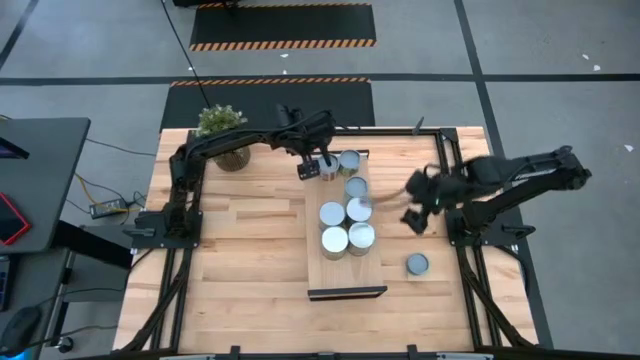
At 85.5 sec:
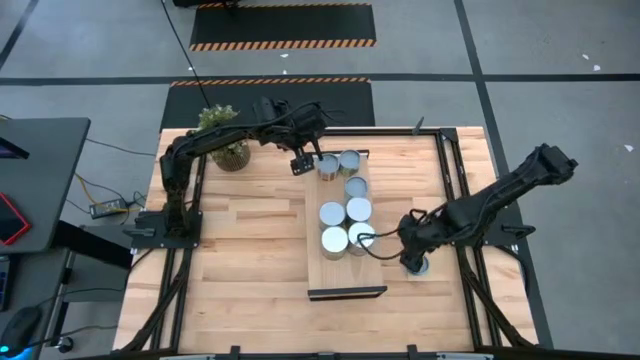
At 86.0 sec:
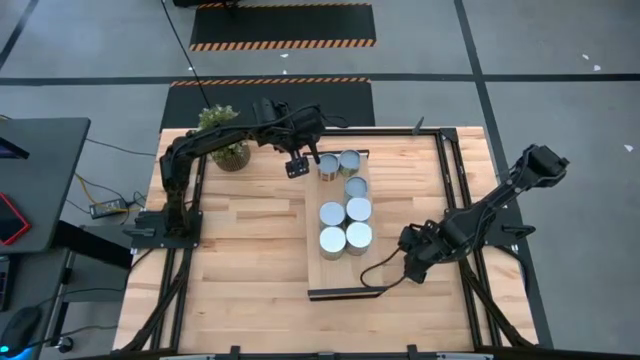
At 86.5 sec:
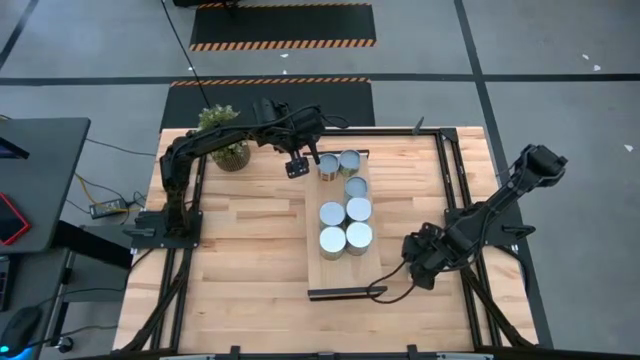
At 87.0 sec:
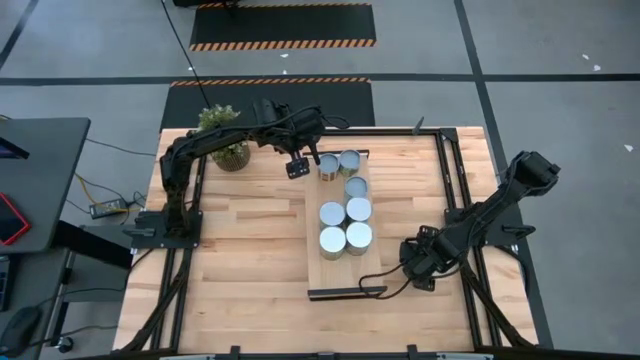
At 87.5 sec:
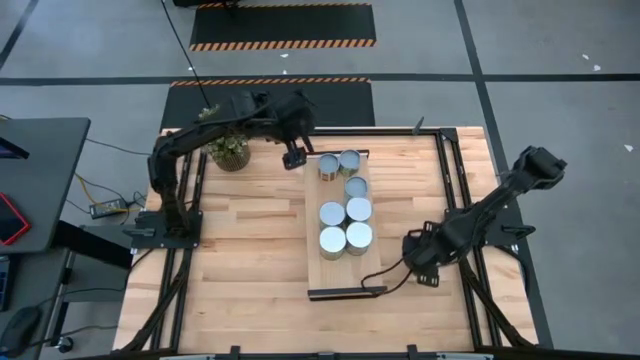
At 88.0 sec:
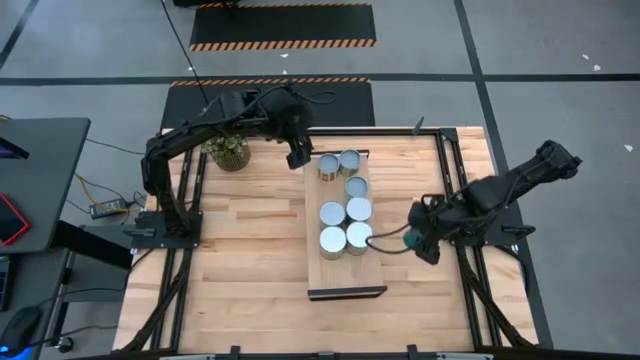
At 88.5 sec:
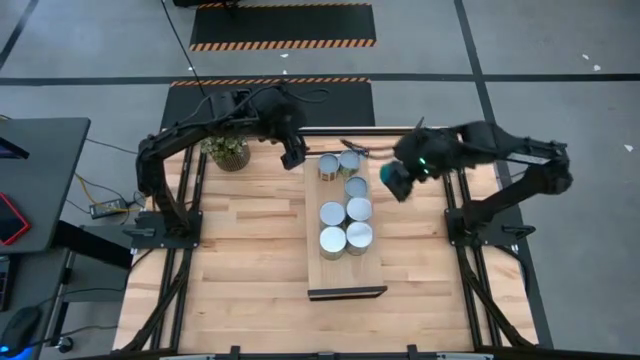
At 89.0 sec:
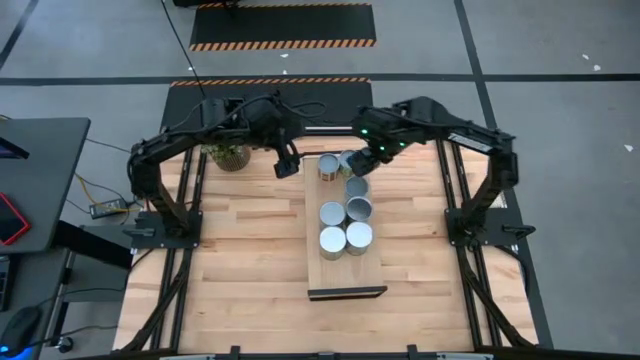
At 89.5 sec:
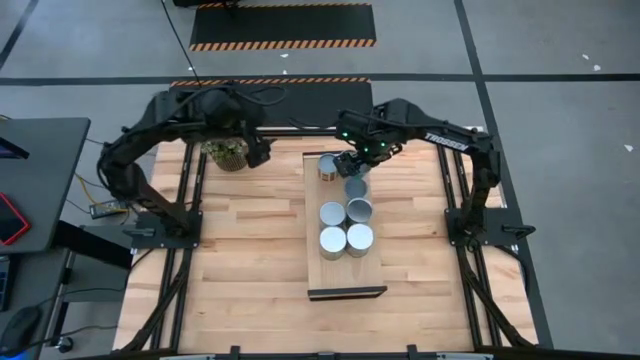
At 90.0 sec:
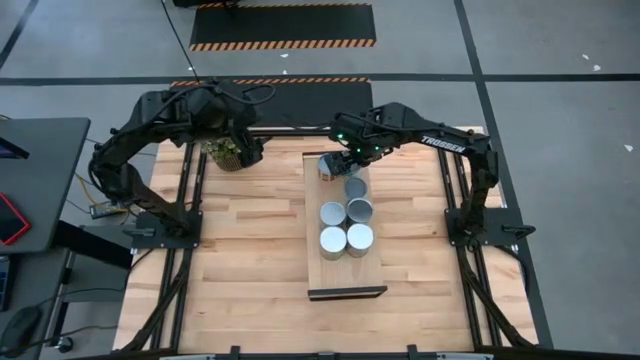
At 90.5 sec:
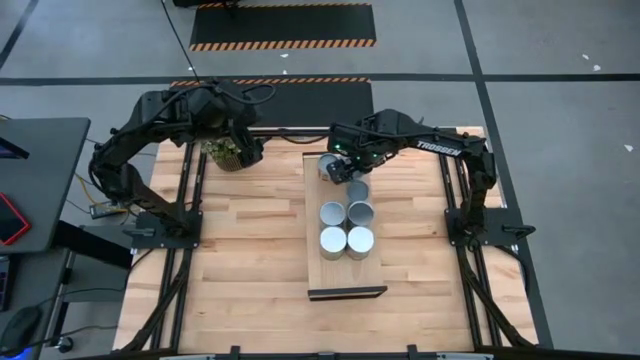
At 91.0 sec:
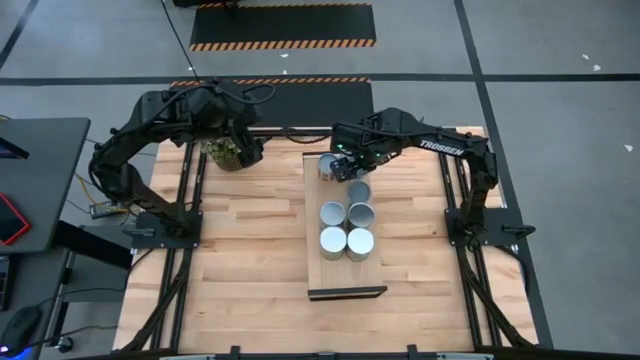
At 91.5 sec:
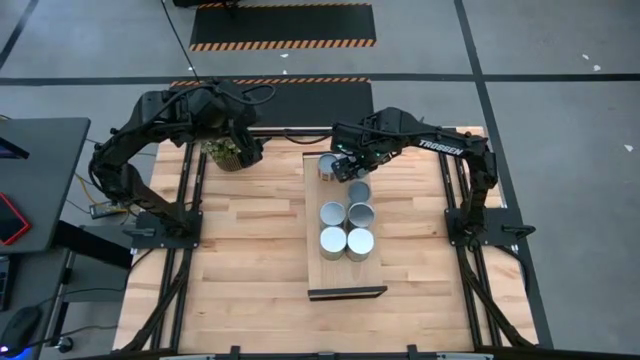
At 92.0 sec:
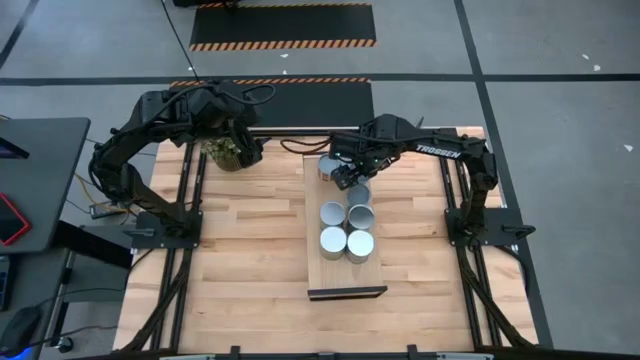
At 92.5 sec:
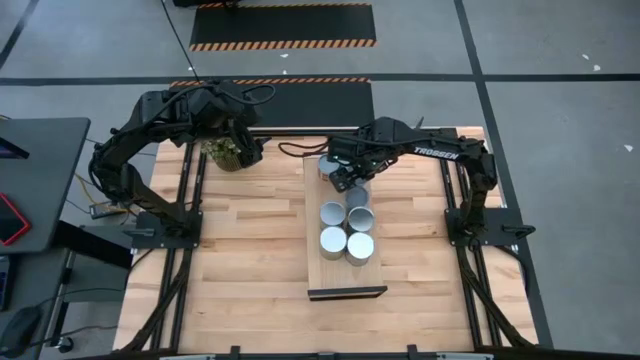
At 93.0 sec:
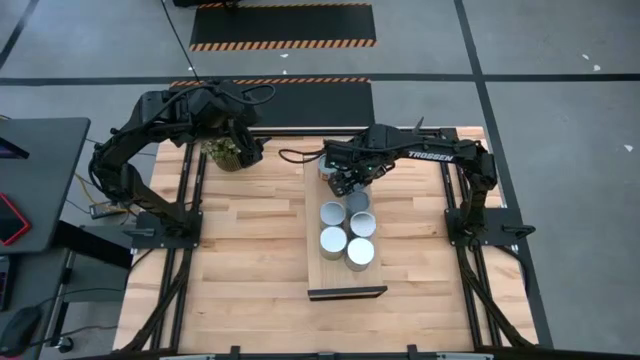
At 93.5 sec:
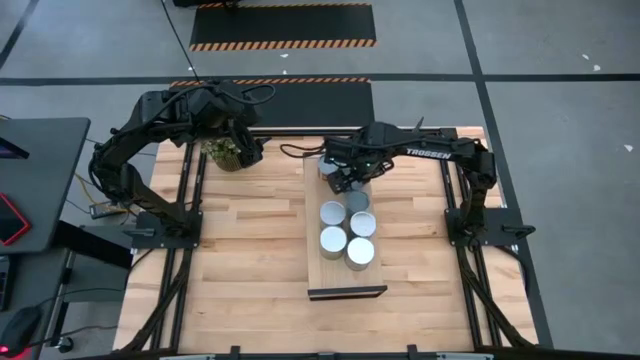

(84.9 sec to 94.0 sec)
Task: Pick and place cans onto a shelf
Put the canned tuna on the shelf

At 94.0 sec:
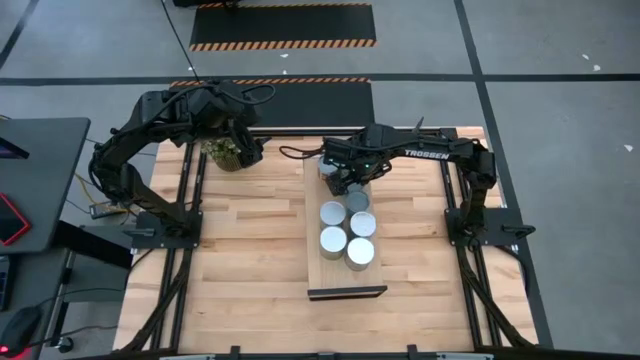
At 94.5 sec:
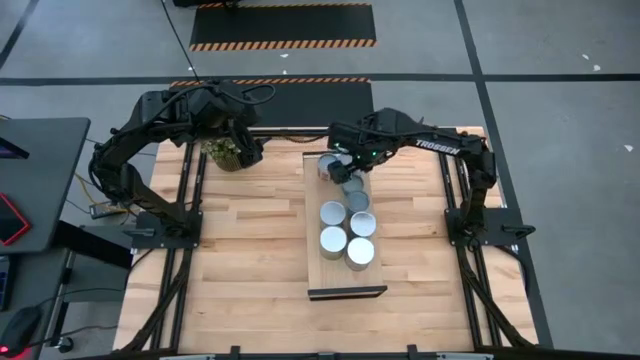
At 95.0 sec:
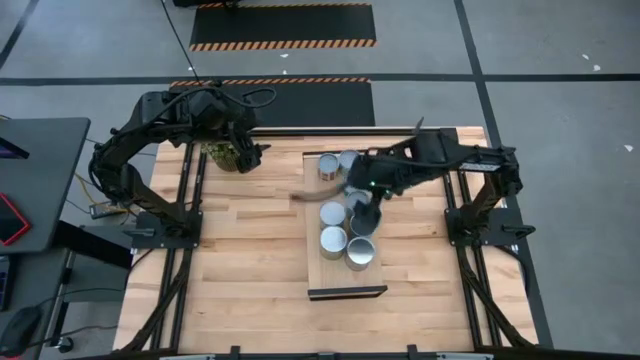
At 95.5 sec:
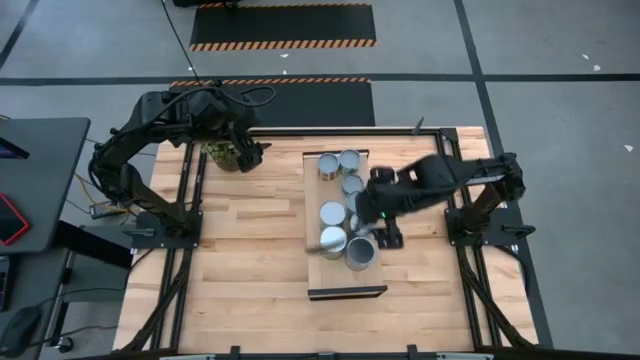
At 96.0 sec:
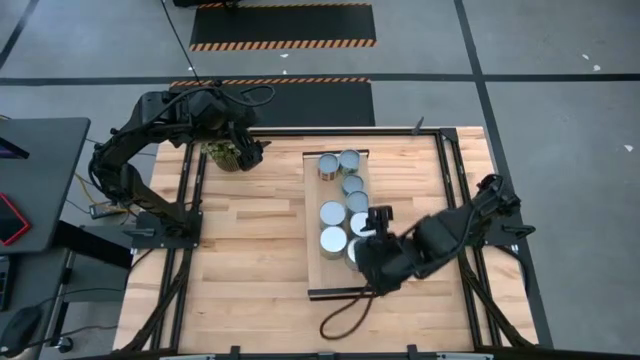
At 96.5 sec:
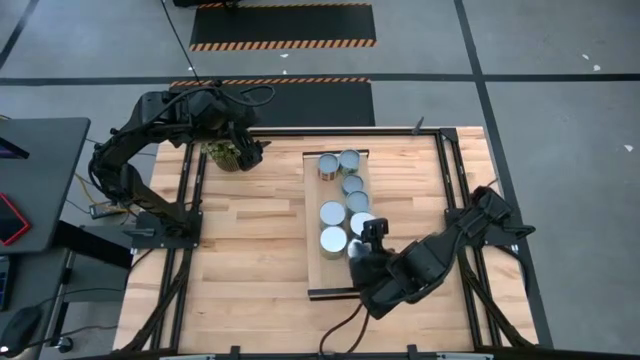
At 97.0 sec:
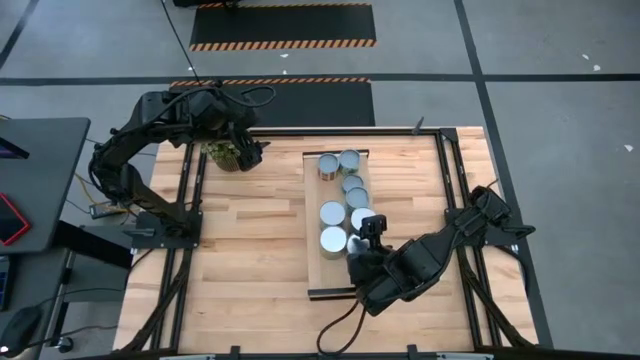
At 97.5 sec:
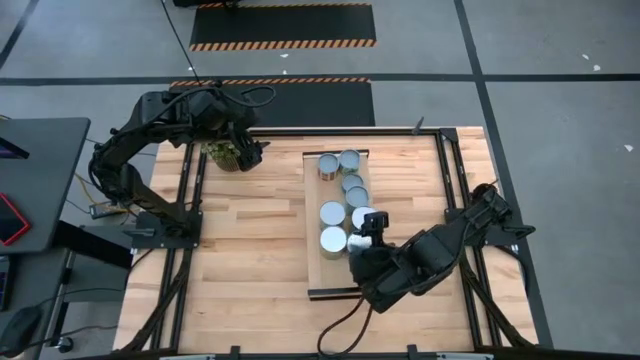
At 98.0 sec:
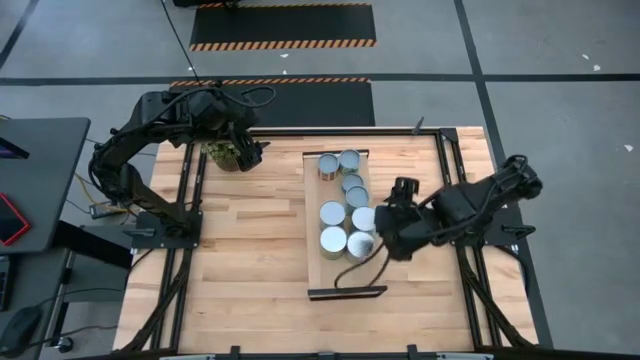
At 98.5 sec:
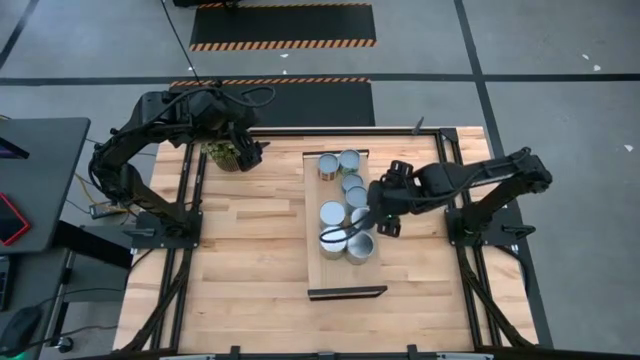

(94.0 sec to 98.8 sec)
Adjust the cans

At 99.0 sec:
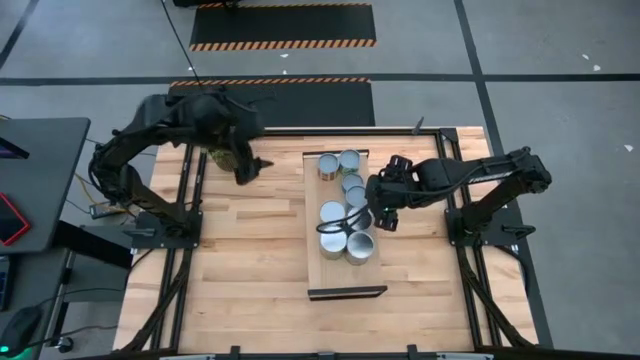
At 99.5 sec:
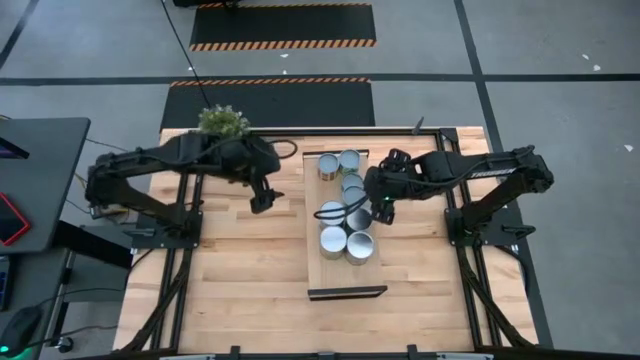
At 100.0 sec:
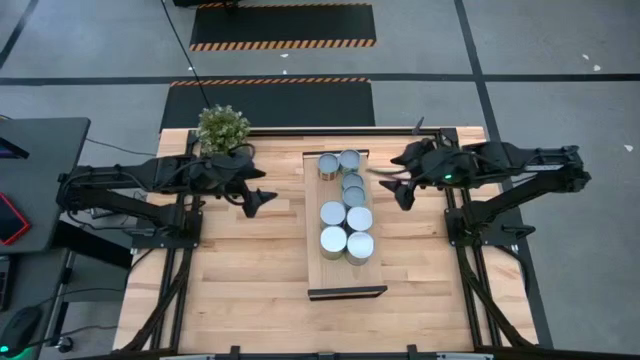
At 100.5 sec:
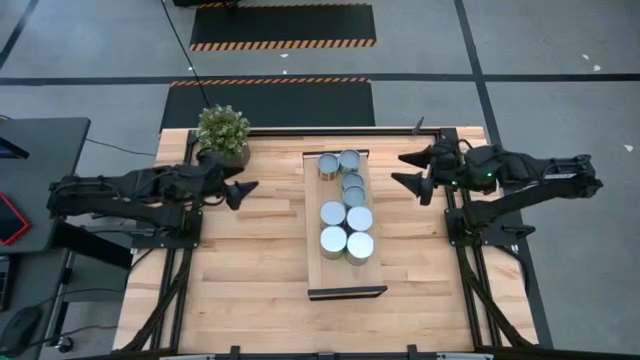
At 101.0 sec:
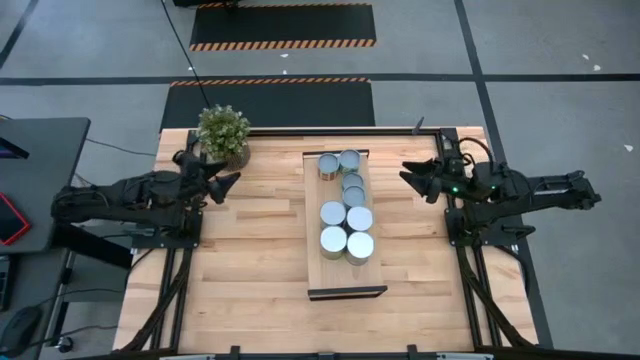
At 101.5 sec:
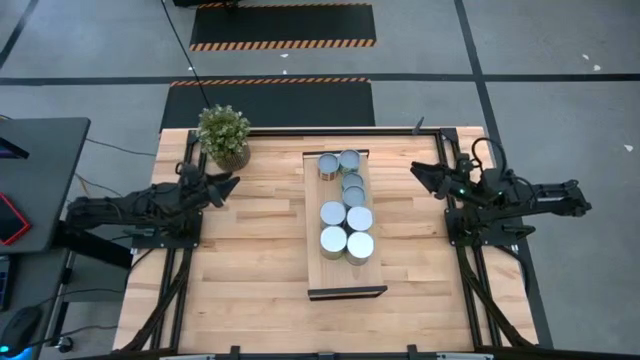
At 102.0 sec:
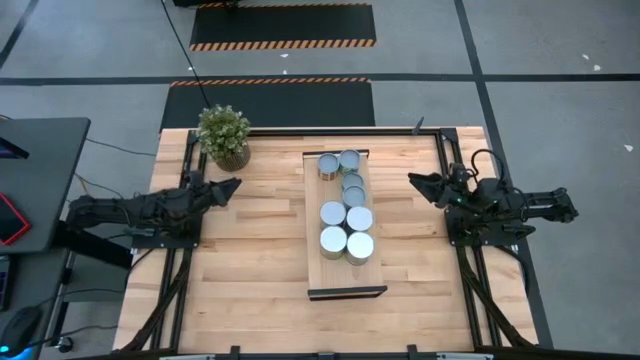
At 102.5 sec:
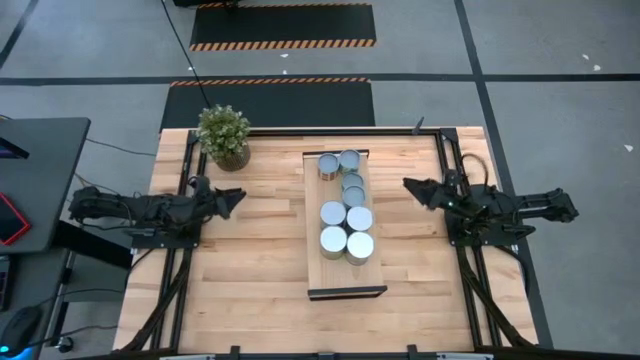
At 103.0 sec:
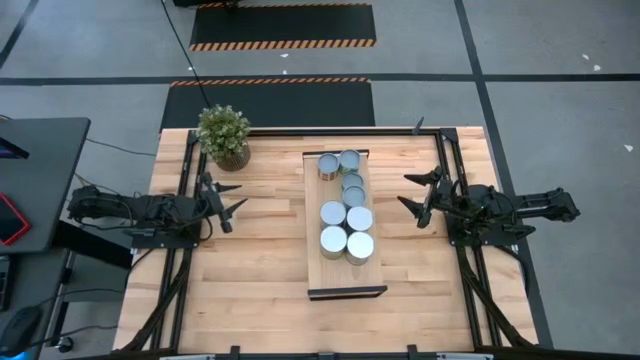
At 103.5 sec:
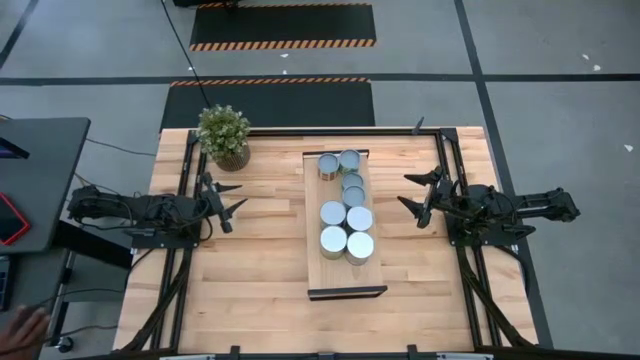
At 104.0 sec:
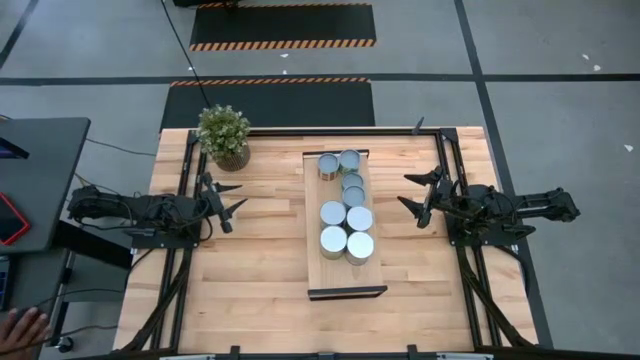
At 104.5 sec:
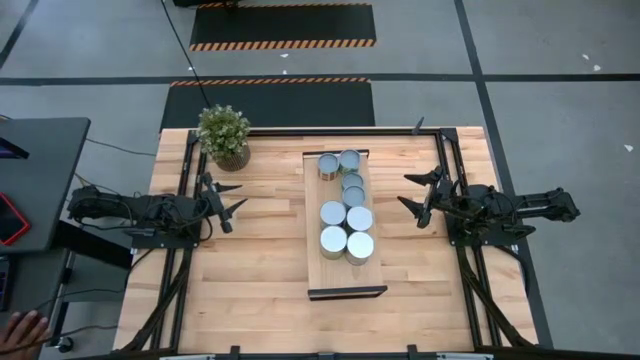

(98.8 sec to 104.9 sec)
Return to Home Position

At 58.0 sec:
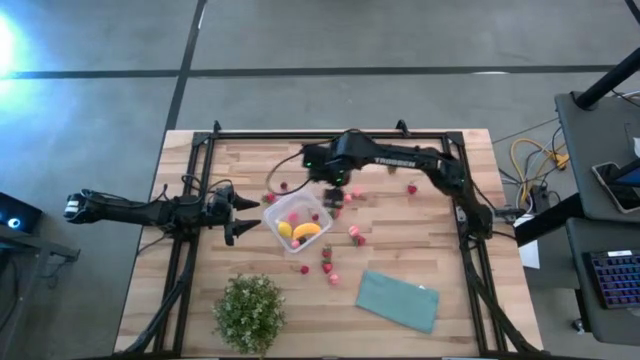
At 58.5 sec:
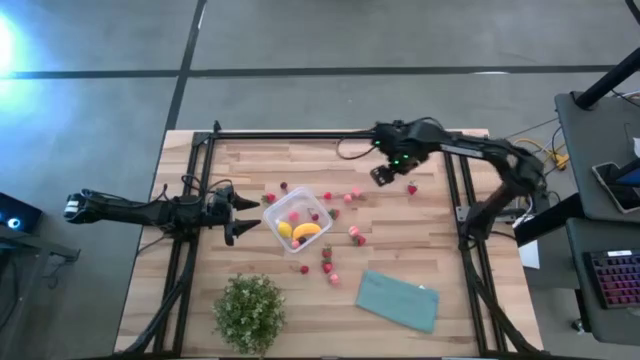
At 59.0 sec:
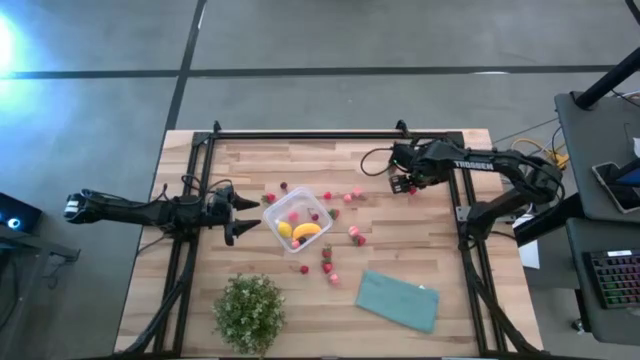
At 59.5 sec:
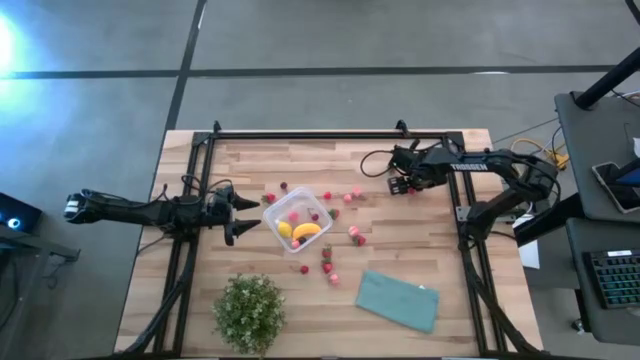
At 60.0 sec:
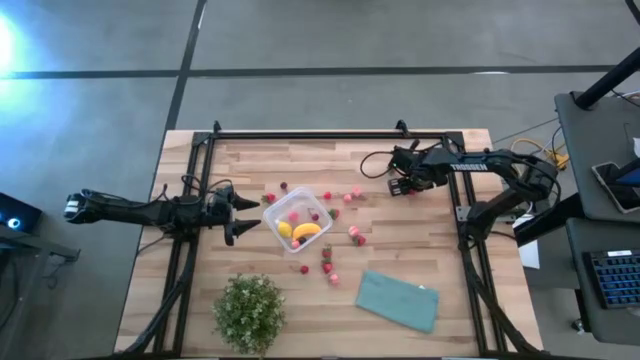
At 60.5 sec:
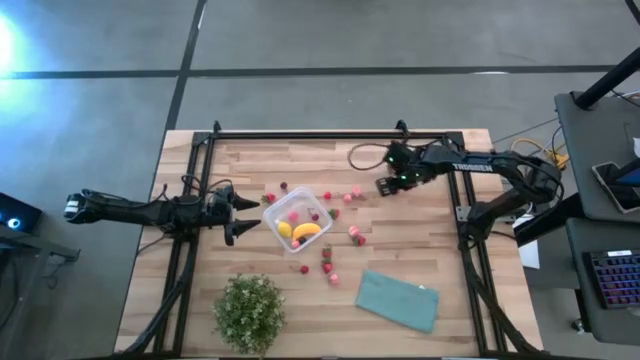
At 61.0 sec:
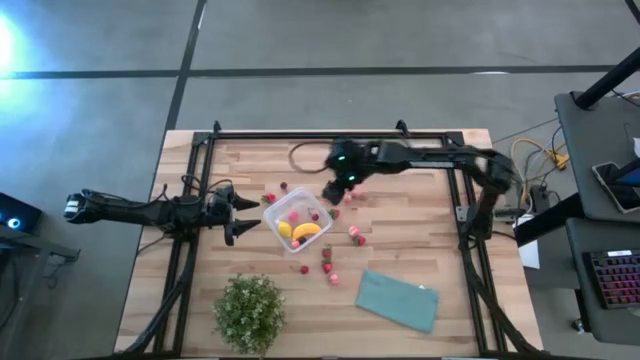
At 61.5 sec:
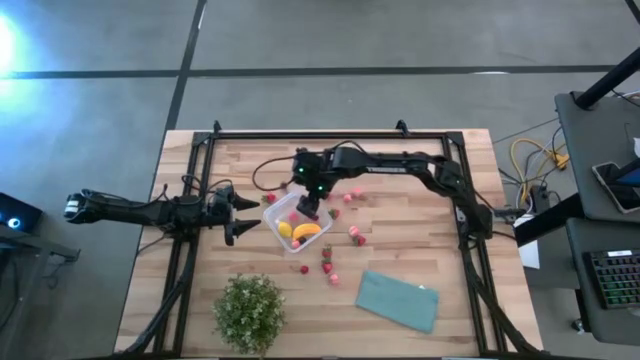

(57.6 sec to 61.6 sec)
Task: Pick and placing Produce into tupperware
Put the red strawberry into the transparent bin
